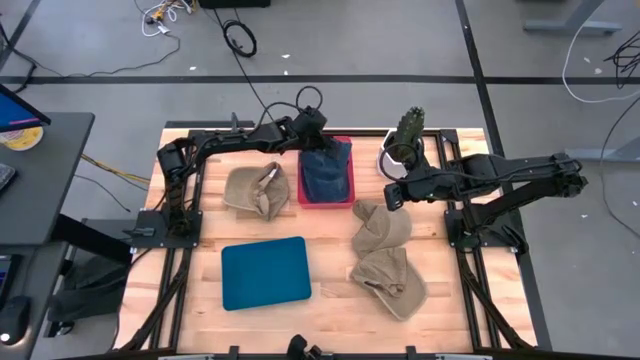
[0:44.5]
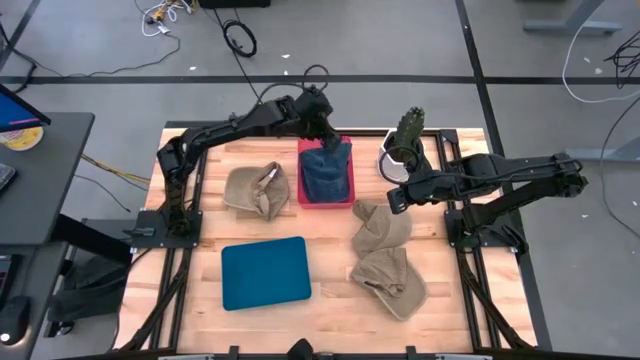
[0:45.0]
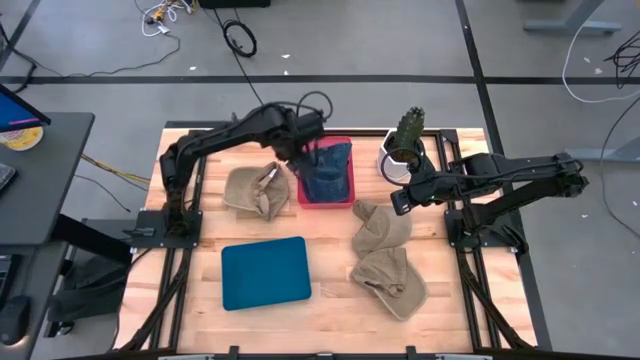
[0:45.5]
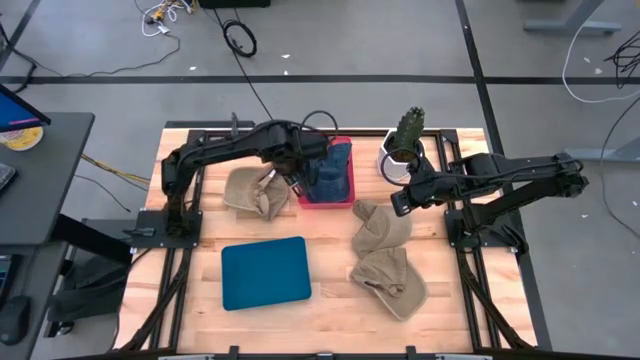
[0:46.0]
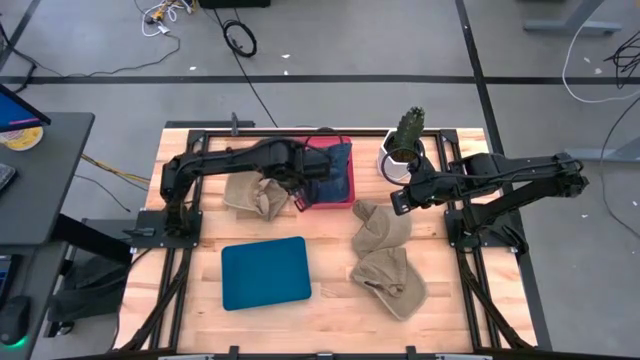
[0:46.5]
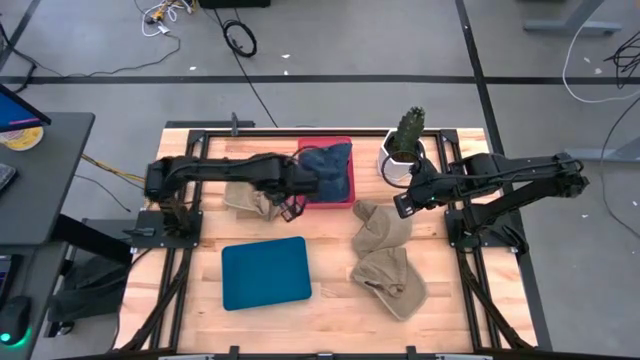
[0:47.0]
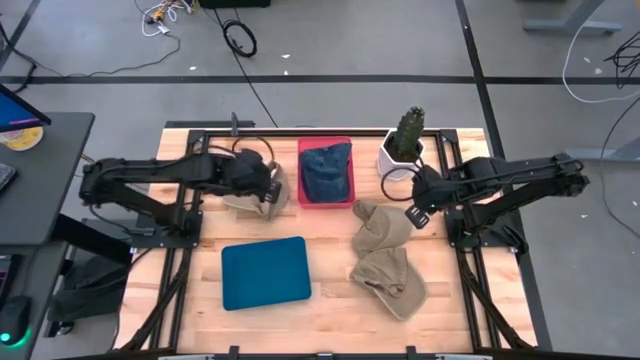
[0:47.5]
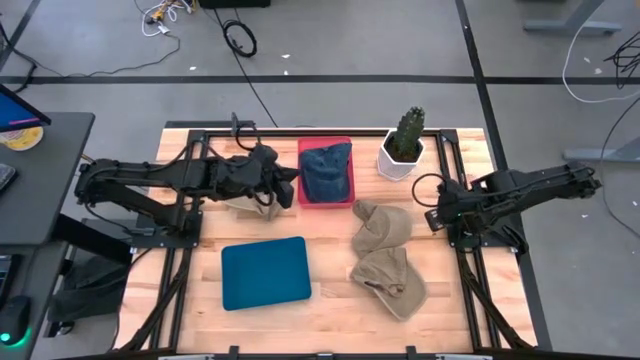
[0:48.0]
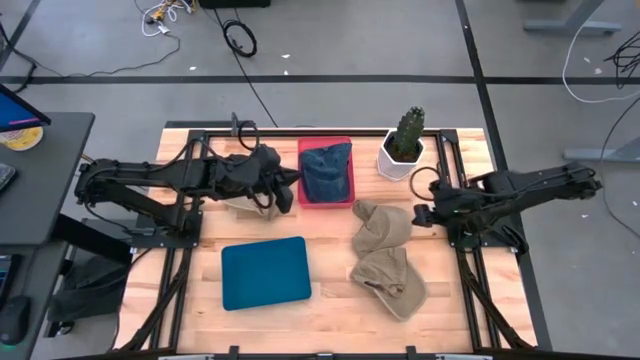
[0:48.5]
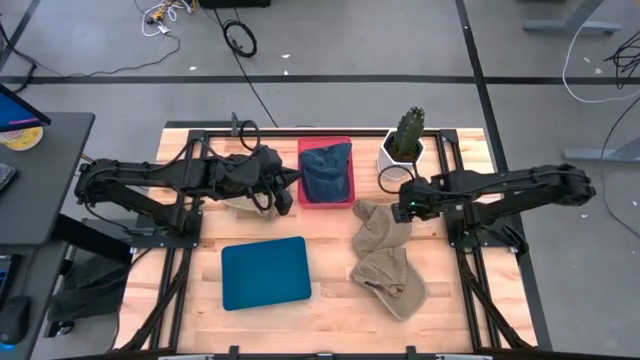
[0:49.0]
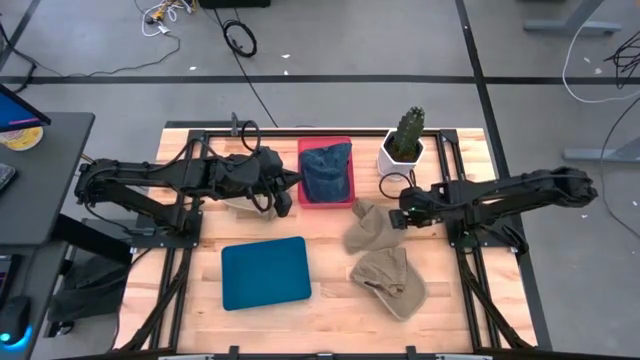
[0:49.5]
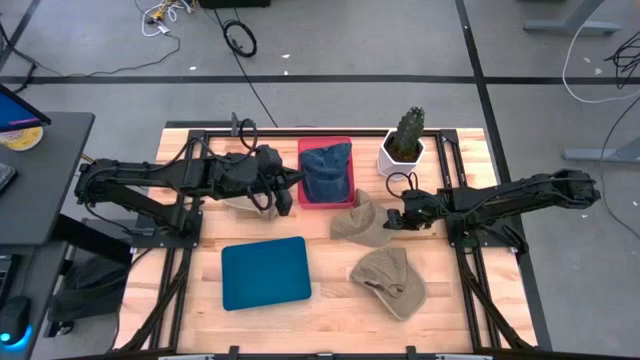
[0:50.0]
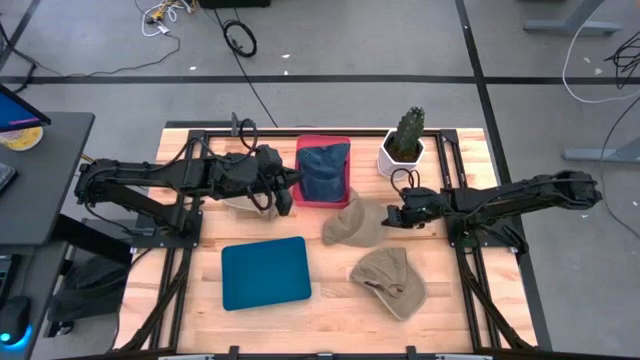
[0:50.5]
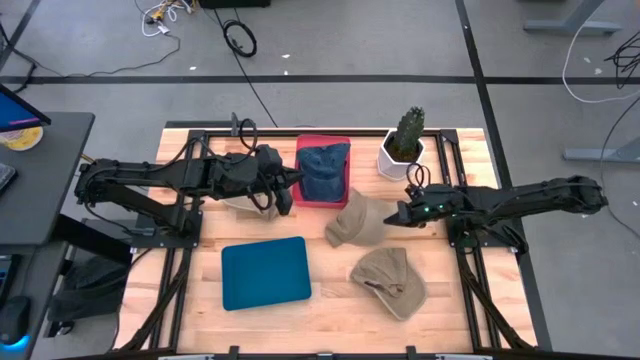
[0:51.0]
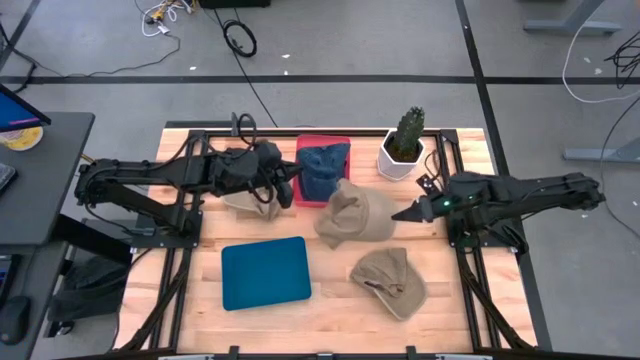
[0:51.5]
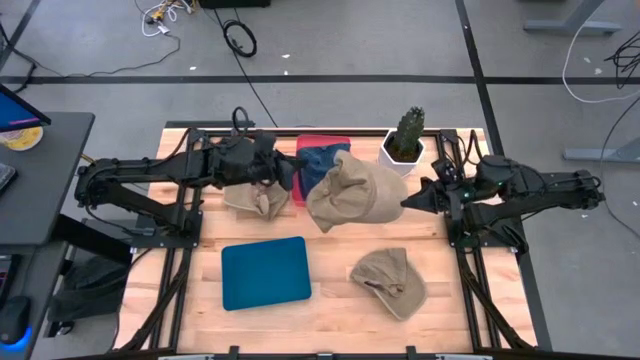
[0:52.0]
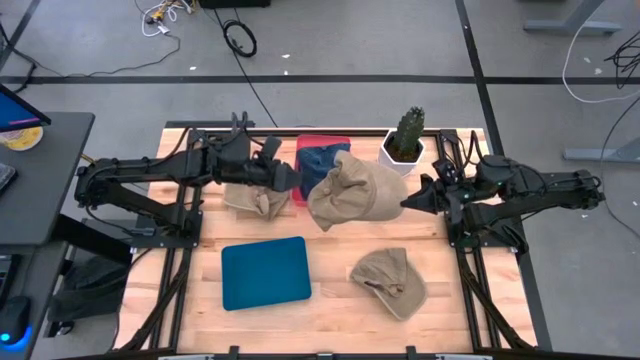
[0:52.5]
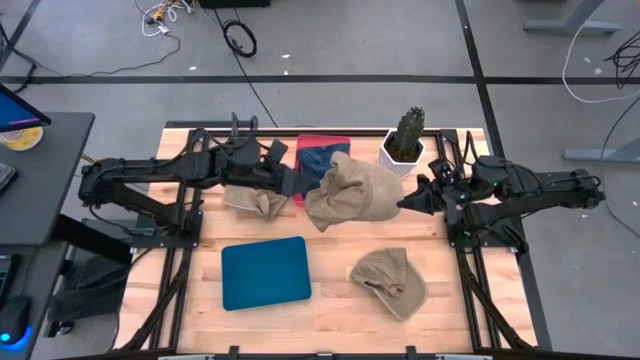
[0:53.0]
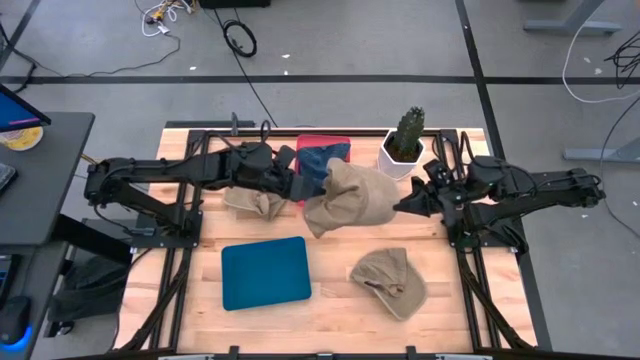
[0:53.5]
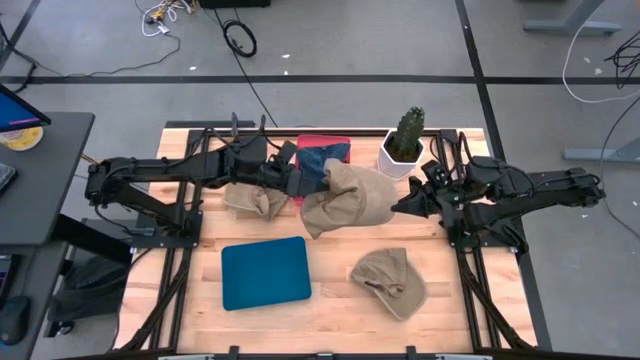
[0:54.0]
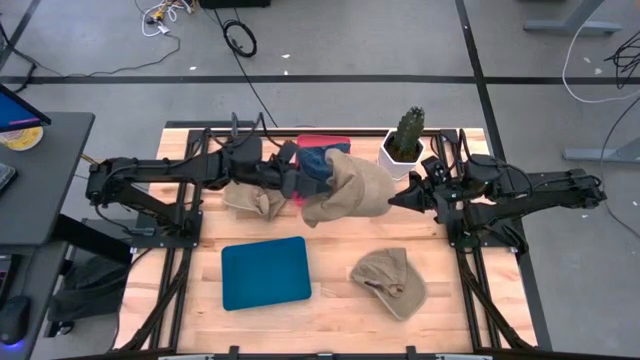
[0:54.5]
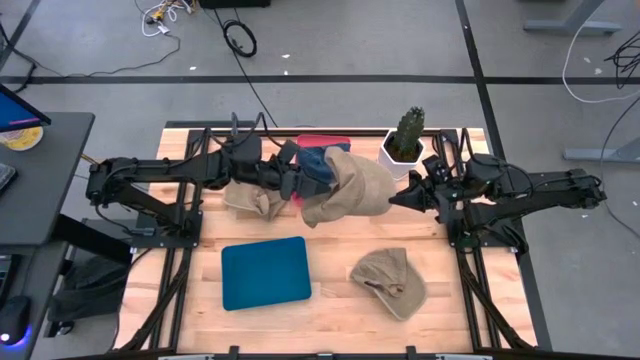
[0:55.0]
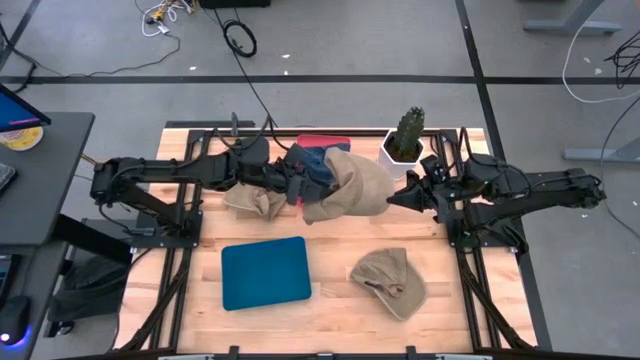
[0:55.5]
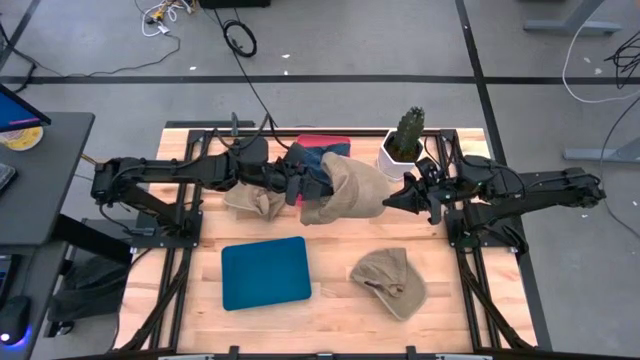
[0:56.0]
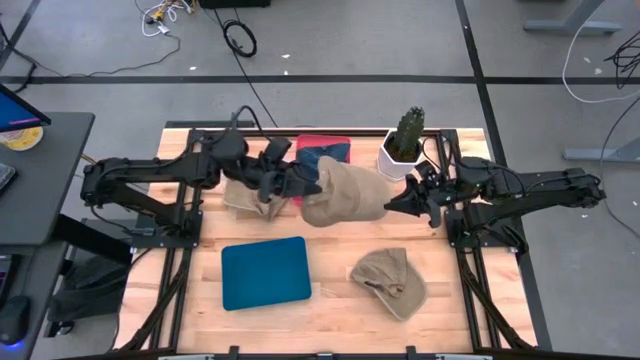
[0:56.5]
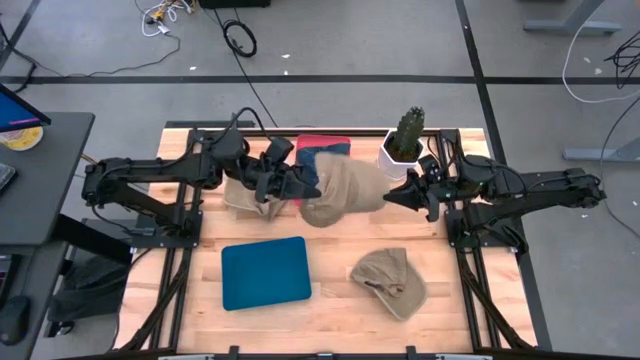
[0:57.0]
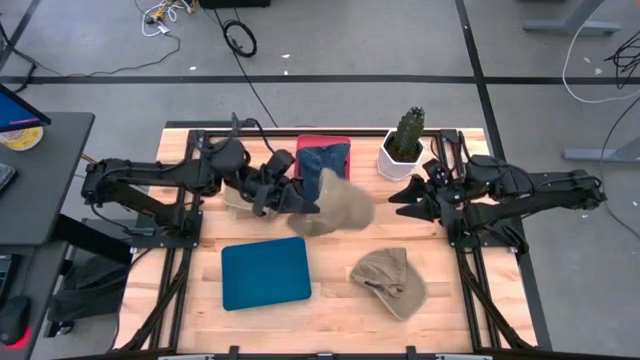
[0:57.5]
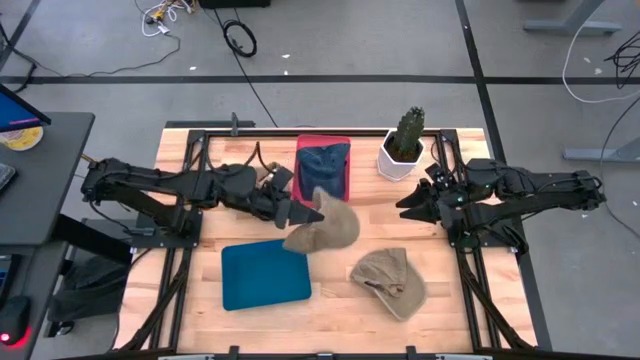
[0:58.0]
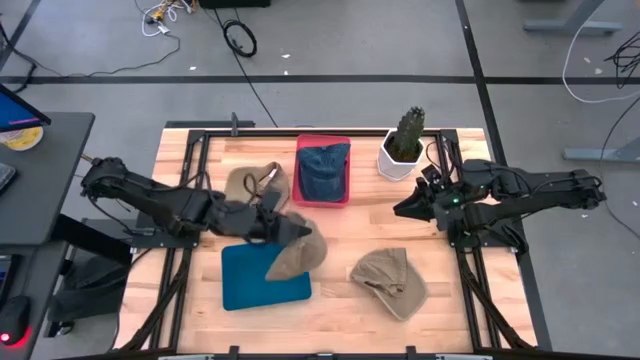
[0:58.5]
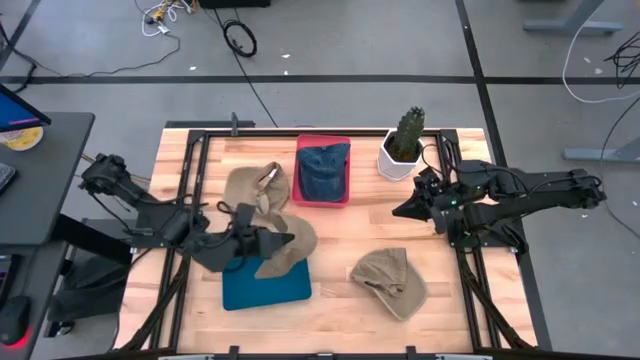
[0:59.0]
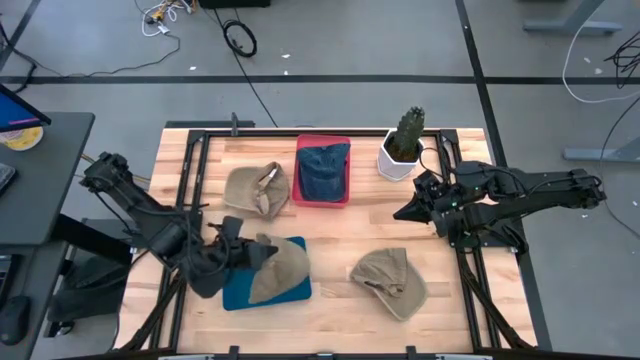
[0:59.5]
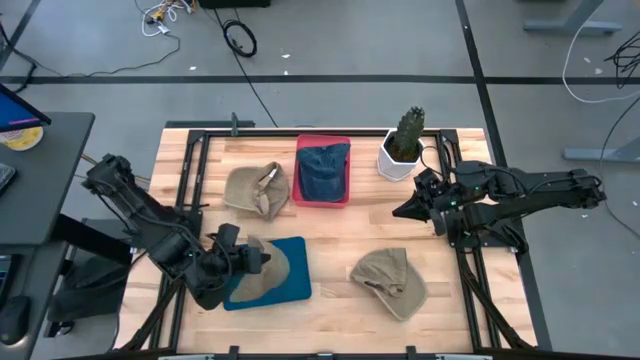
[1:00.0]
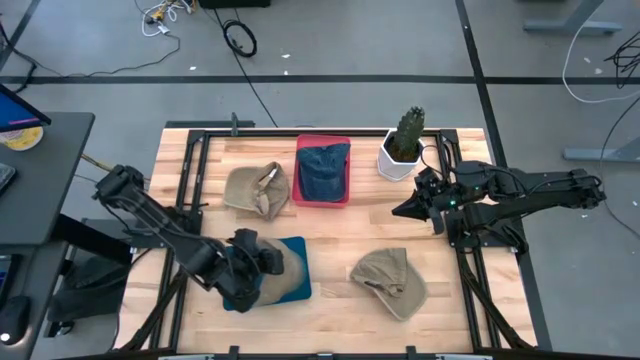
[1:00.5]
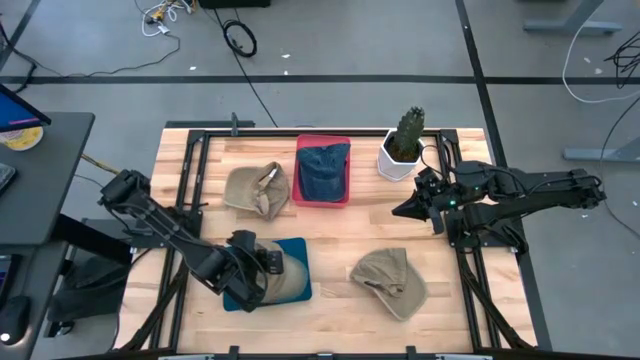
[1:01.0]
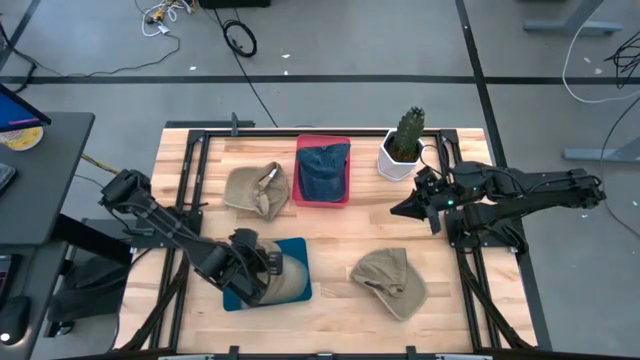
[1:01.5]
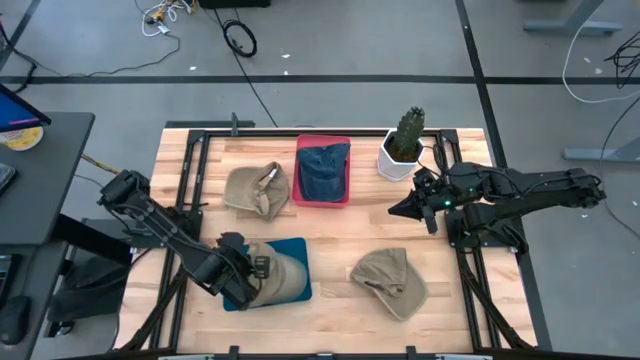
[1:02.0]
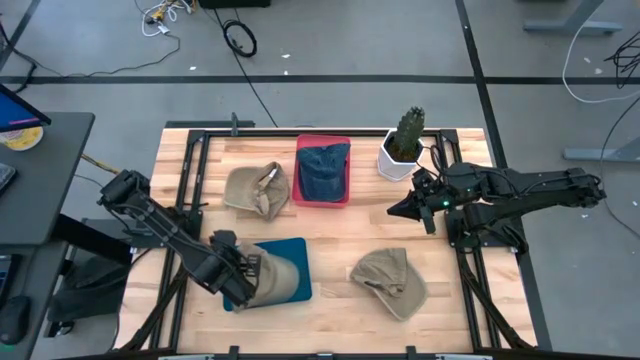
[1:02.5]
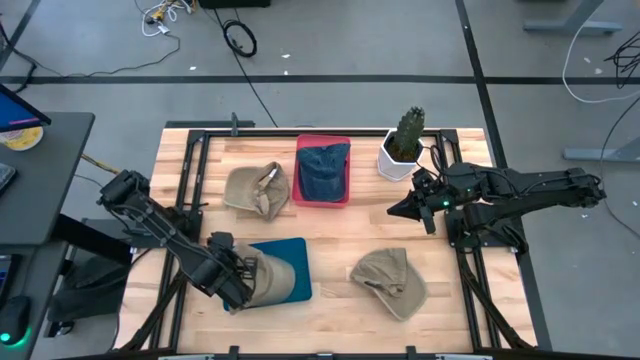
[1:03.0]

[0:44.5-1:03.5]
Task: Pick & Place hat
Put the middle right brown cap into the blue bin
